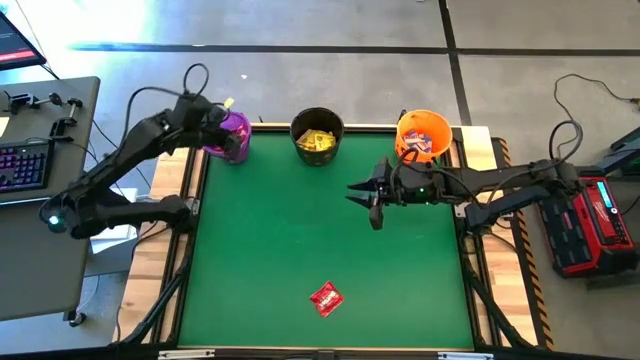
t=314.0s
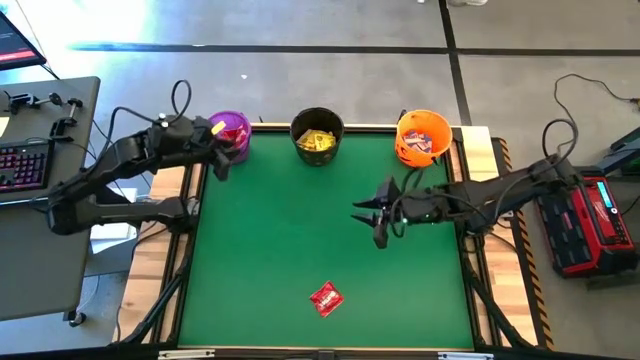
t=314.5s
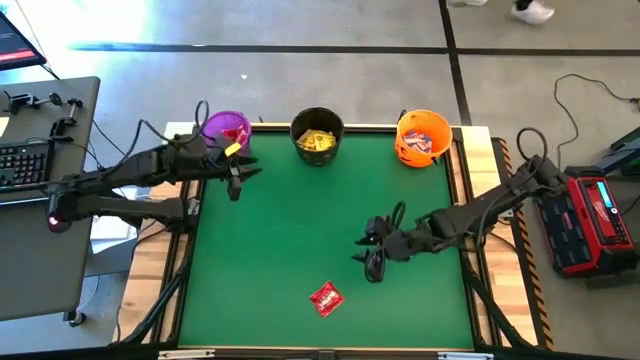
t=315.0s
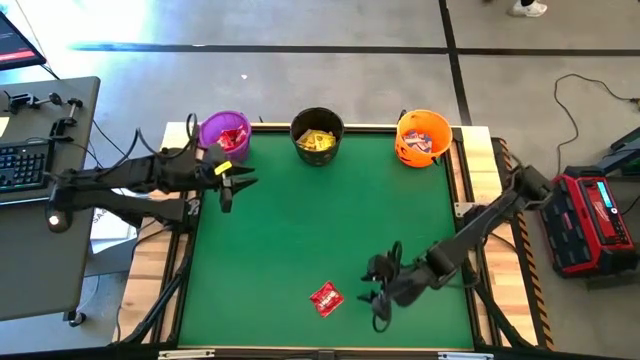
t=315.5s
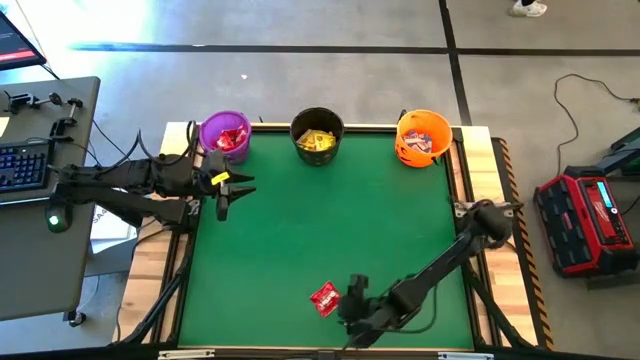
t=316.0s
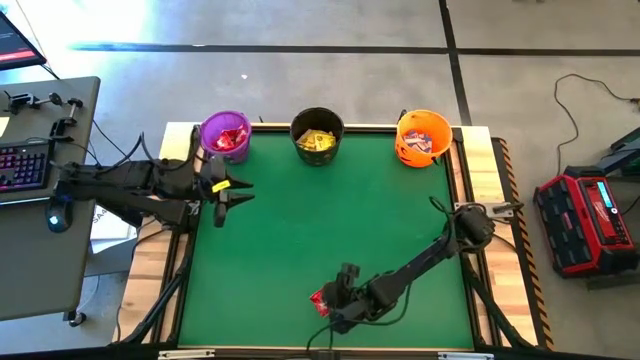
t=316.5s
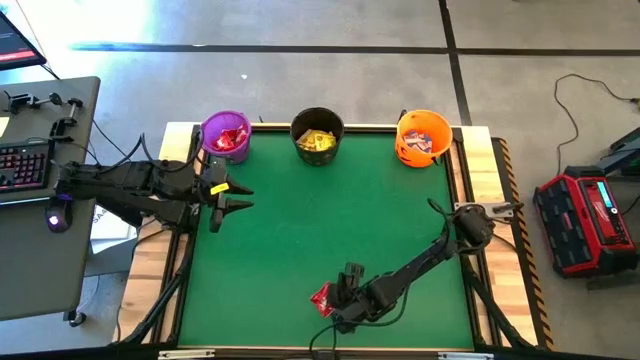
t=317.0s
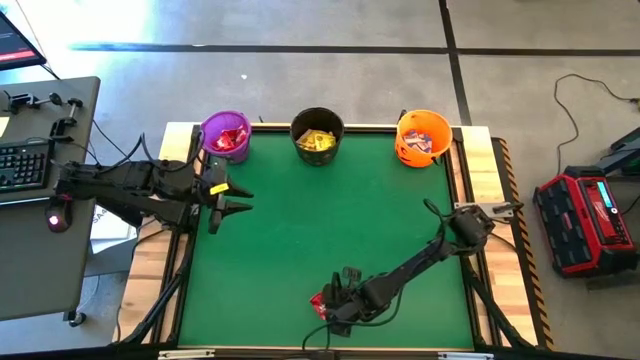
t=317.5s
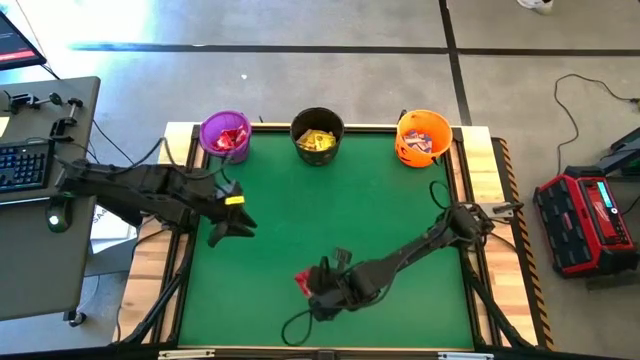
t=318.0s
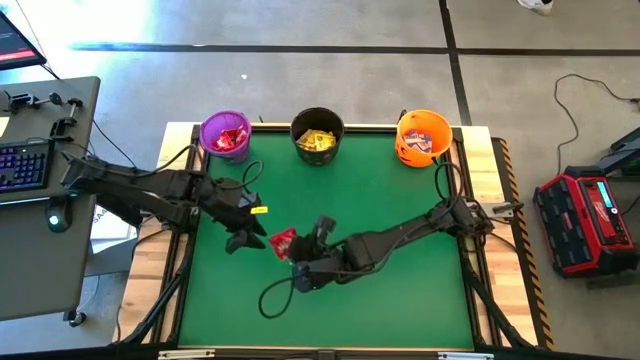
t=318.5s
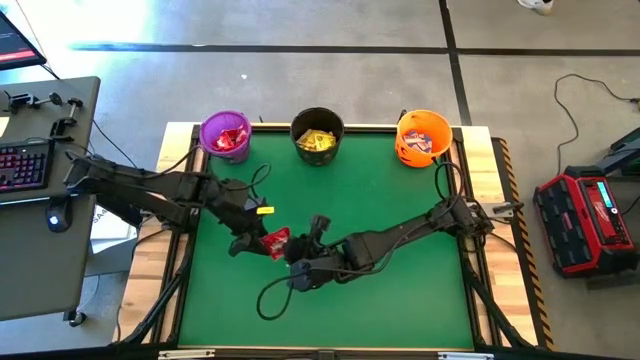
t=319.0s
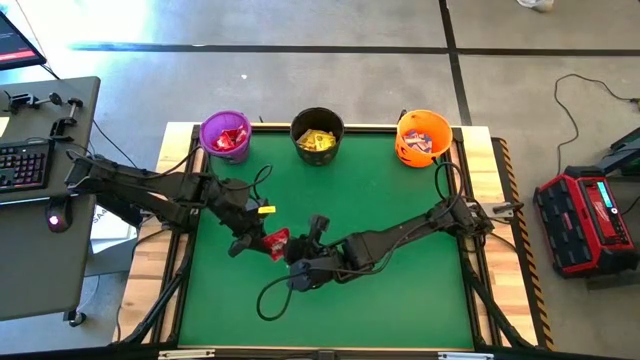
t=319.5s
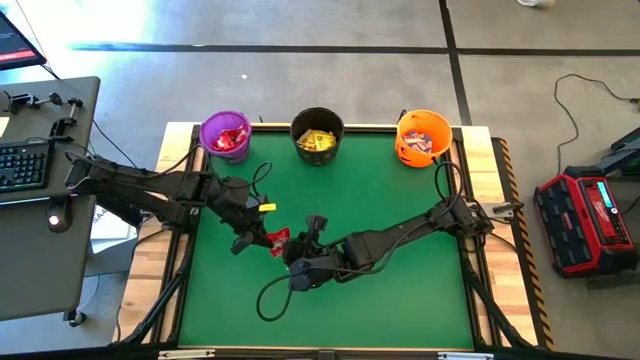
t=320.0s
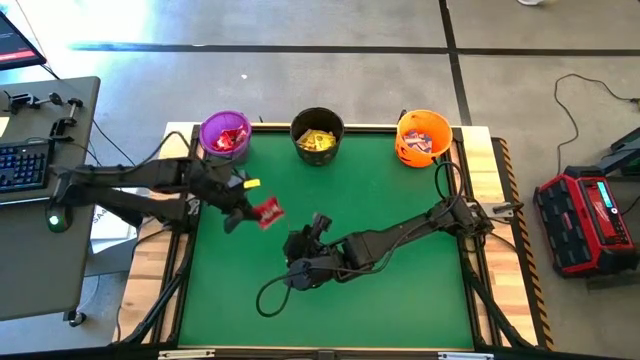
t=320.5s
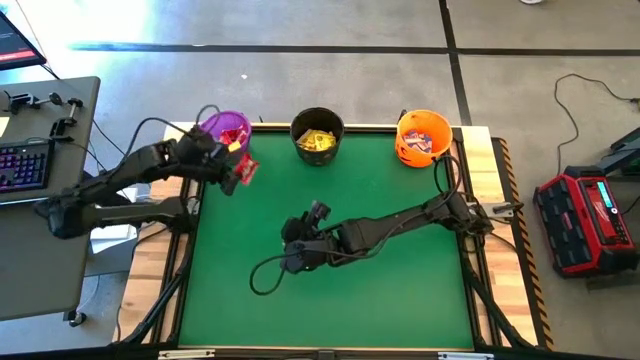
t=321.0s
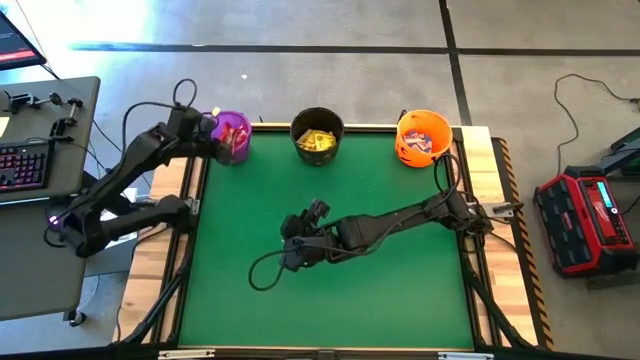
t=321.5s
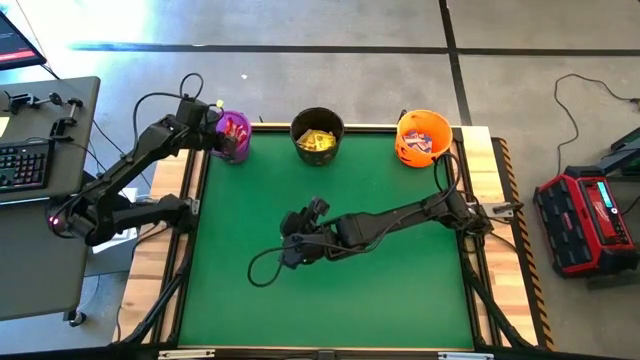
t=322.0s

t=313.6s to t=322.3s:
Task: Sort candy by brand, put in halloween buckets
Put the red candy pack into the violet bucket

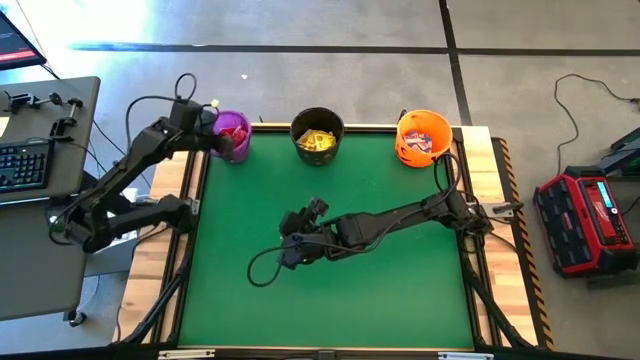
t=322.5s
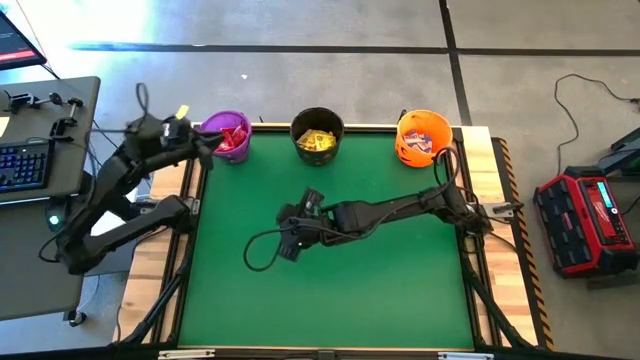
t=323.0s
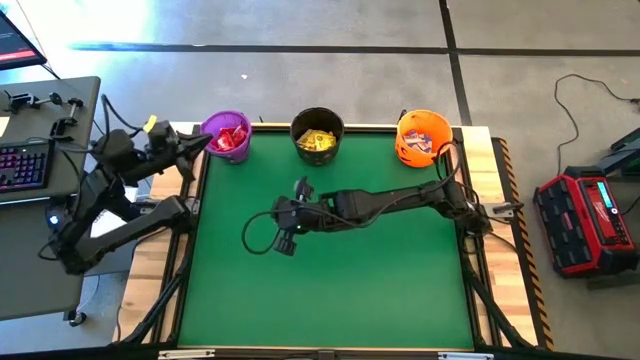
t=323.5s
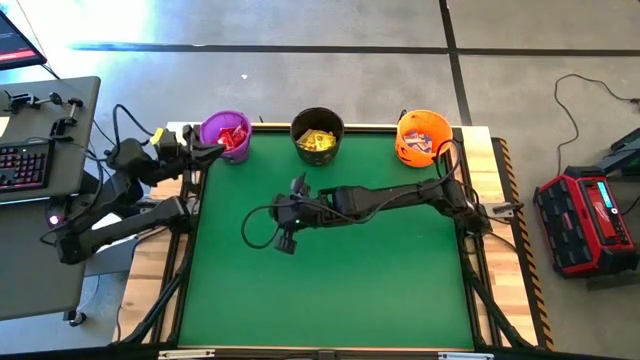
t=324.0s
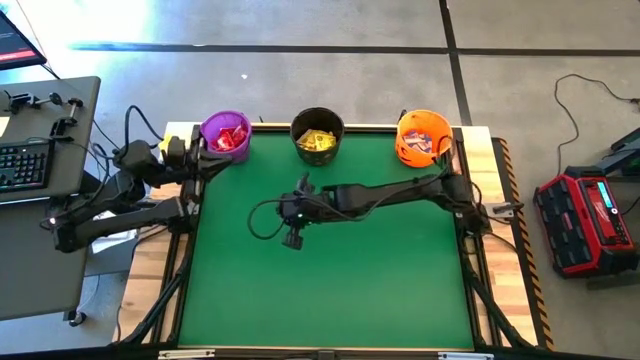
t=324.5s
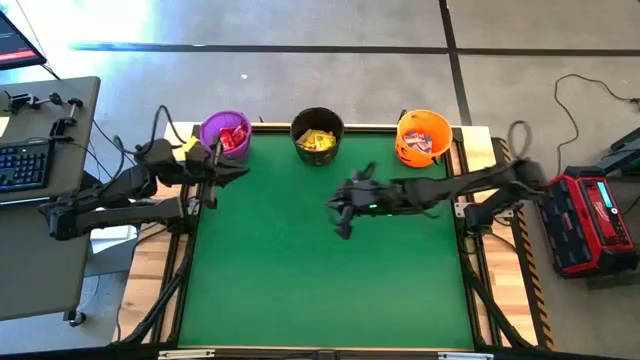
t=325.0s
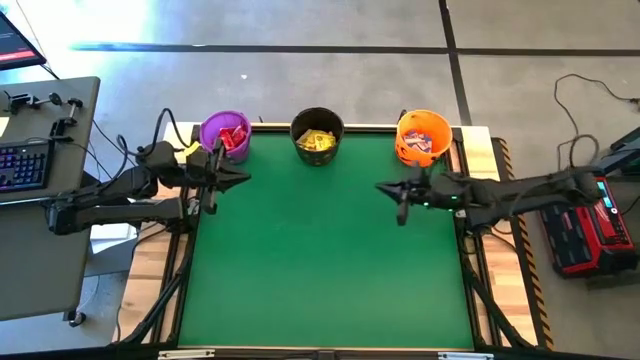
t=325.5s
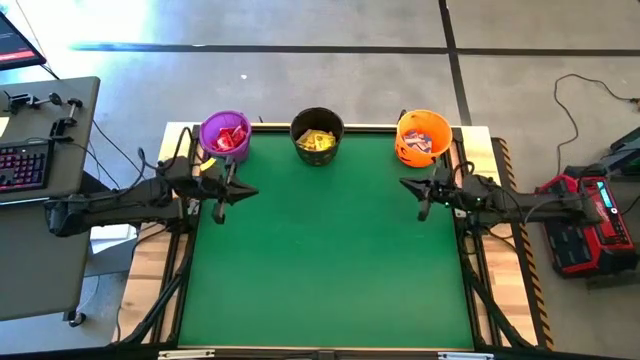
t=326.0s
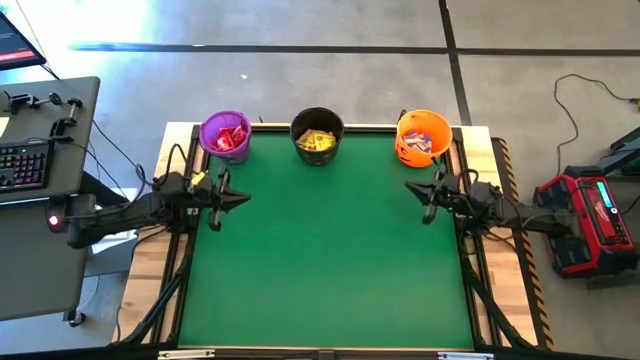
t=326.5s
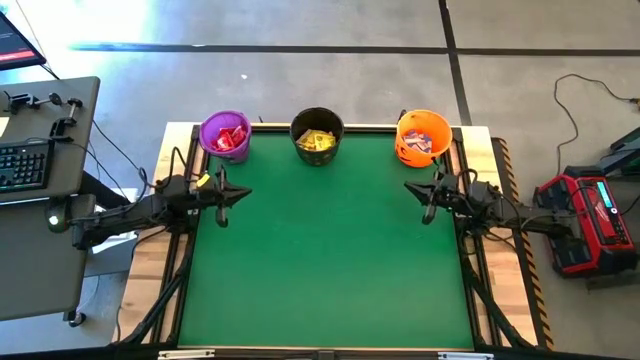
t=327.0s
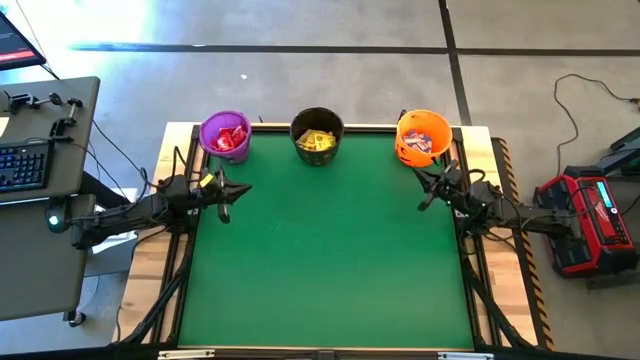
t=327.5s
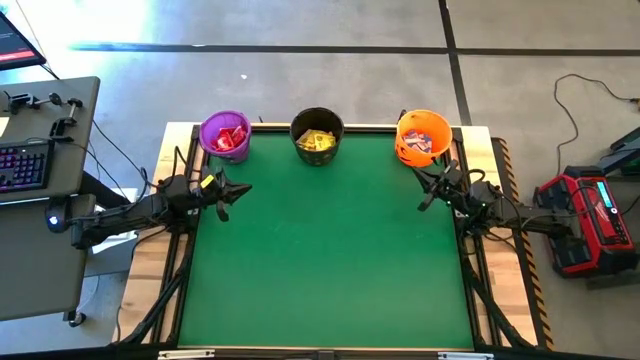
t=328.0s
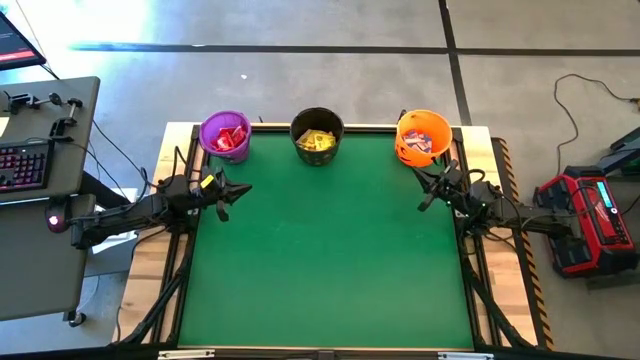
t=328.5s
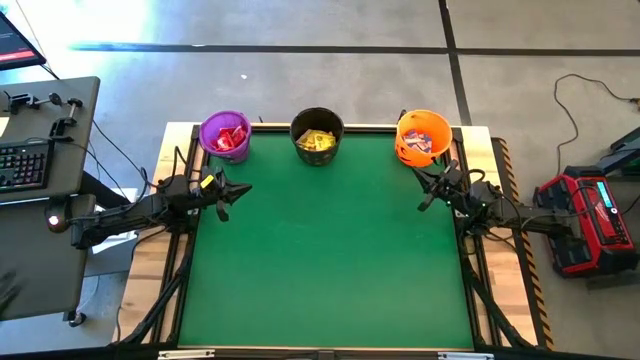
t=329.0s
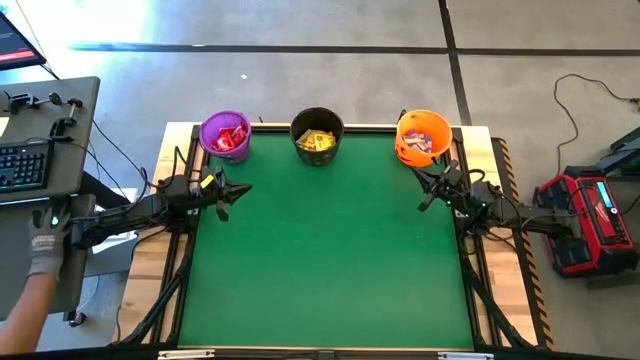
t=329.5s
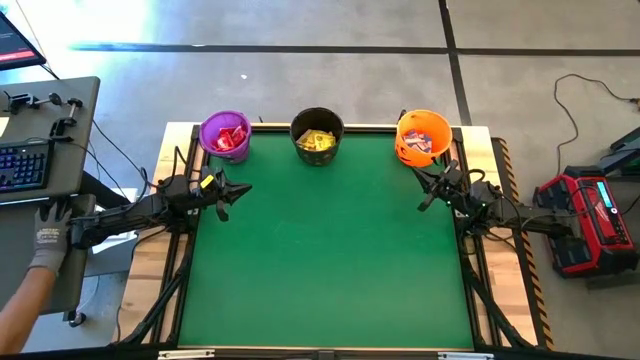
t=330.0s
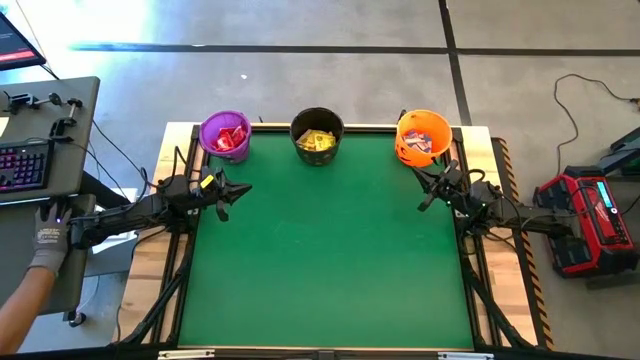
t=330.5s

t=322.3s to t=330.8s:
Return to Home Position

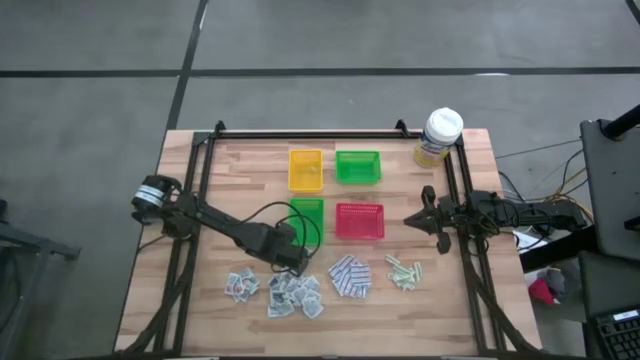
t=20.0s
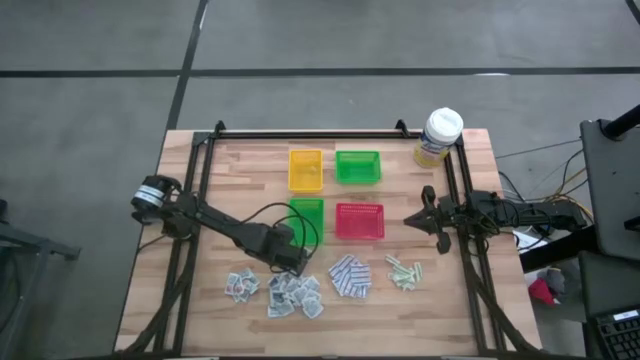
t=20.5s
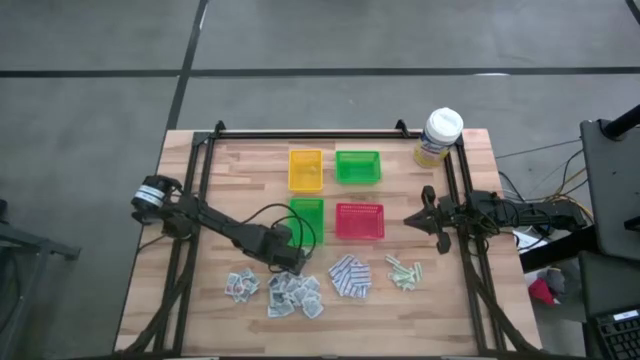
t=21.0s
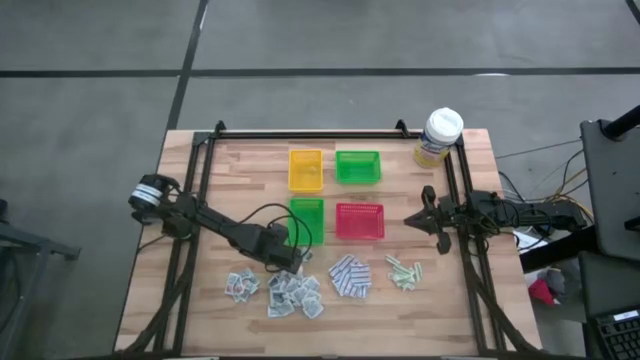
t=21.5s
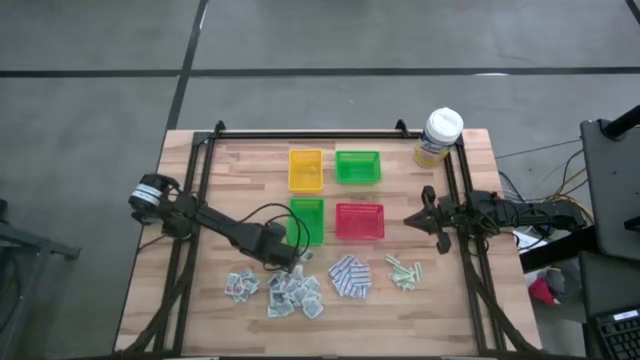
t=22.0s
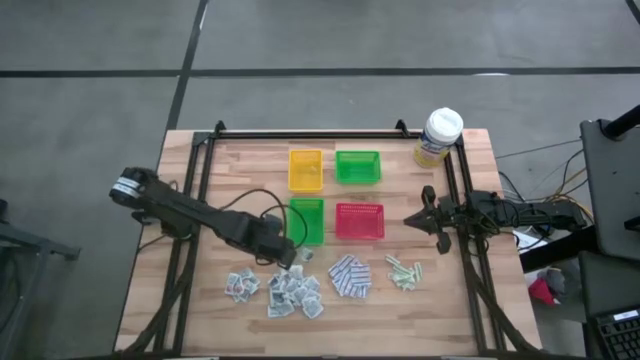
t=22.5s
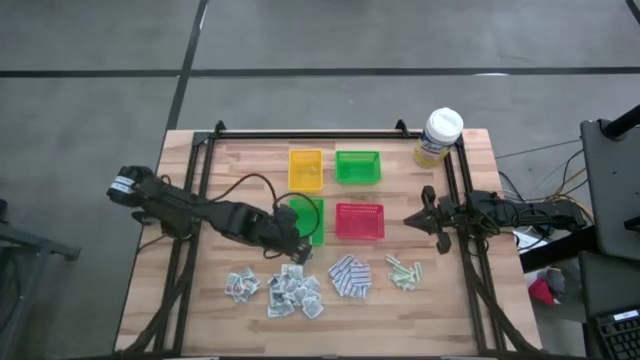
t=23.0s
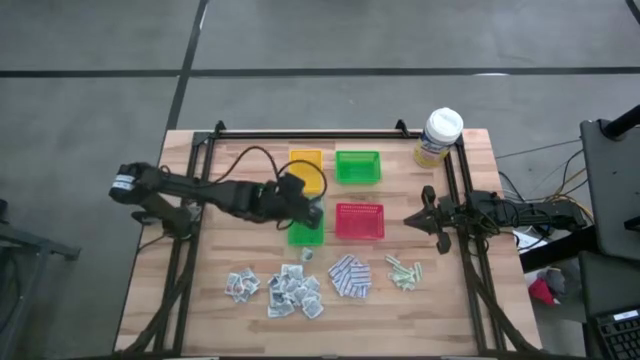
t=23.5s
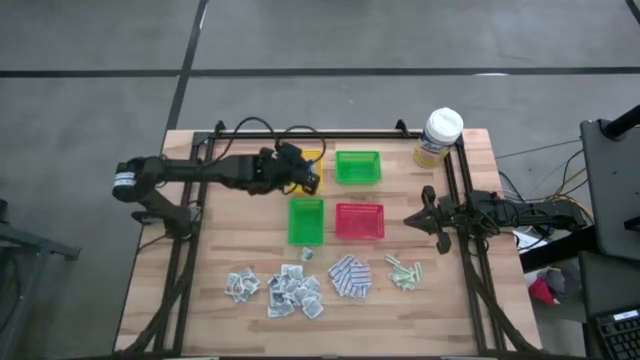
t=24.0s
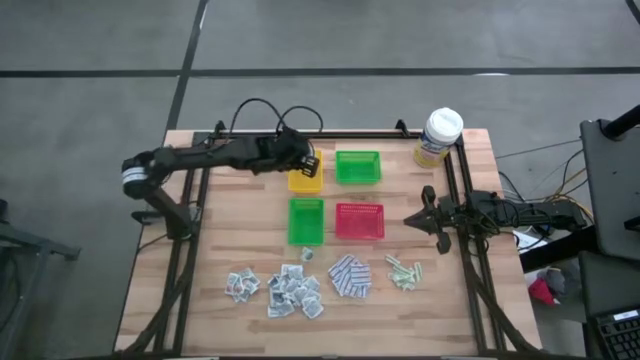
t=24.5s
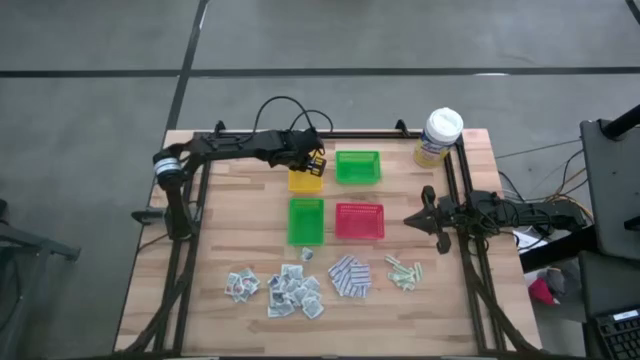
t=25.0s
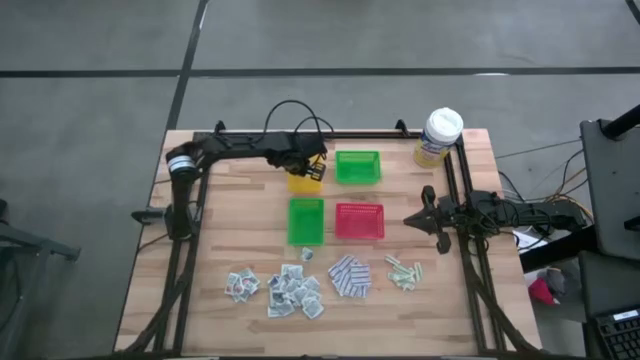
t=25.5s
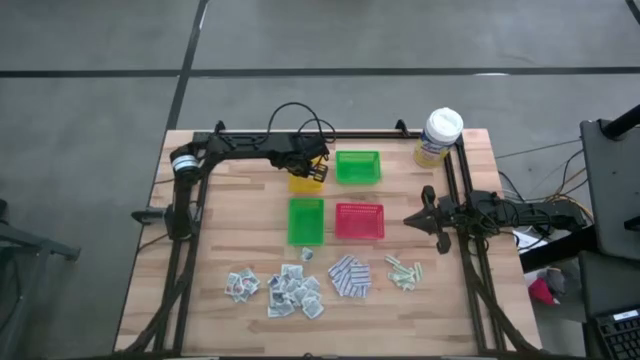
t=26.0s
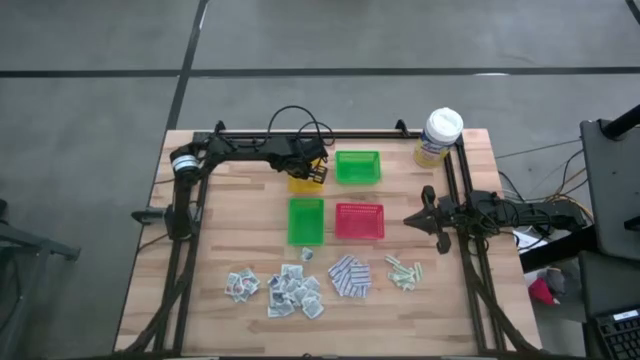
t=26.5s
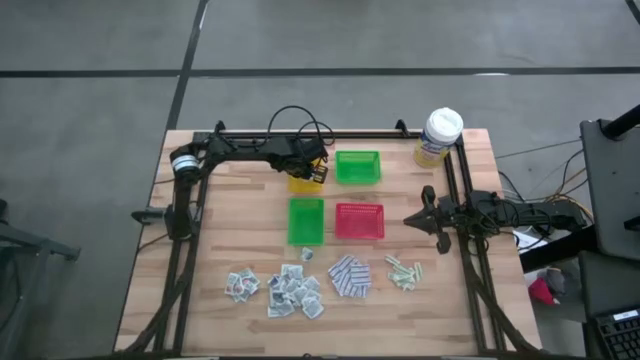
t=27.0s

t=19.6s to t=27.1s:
Task: Pick & Place First Aid Supplies
Put the blue alcohol pad into the yellow bin
